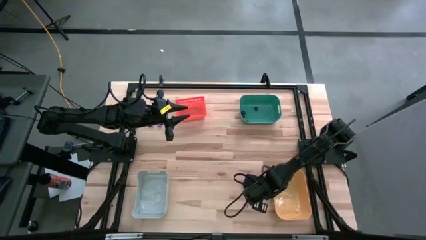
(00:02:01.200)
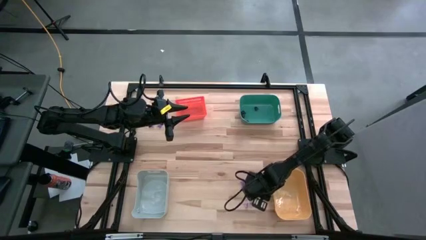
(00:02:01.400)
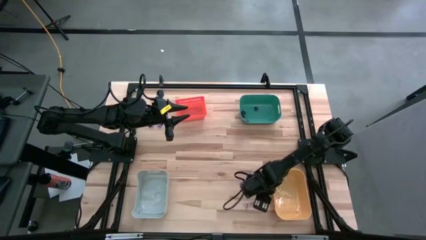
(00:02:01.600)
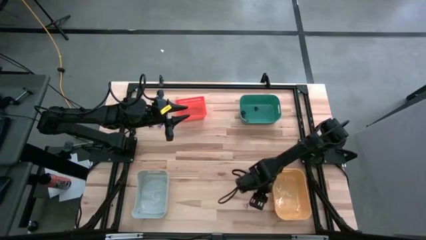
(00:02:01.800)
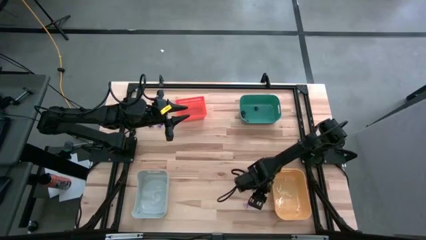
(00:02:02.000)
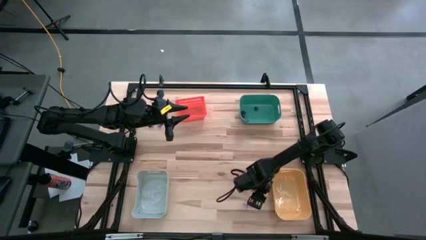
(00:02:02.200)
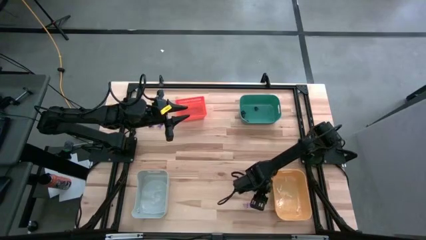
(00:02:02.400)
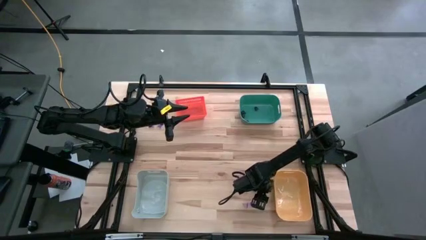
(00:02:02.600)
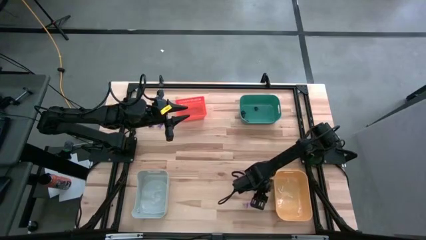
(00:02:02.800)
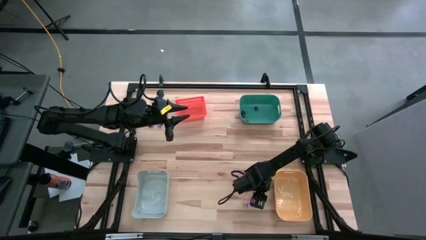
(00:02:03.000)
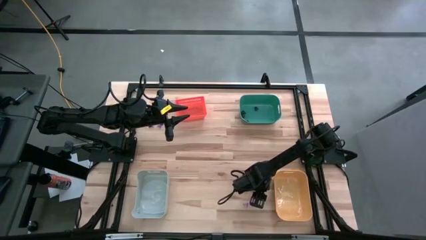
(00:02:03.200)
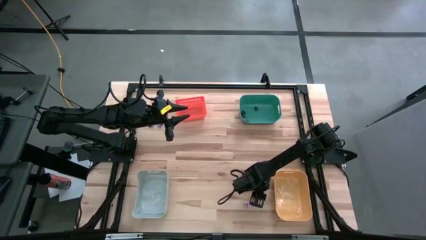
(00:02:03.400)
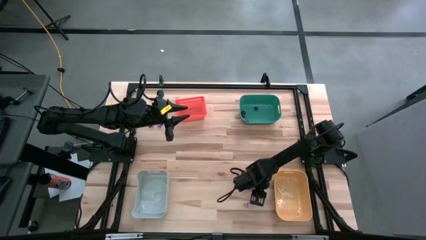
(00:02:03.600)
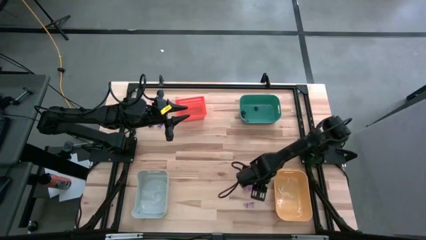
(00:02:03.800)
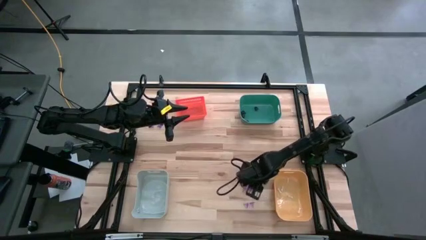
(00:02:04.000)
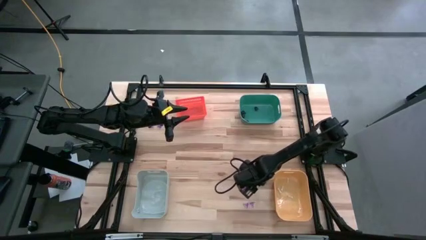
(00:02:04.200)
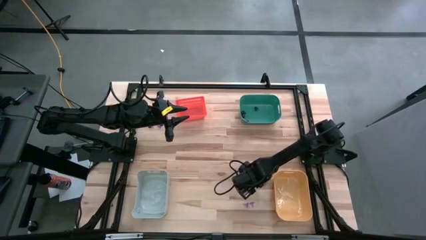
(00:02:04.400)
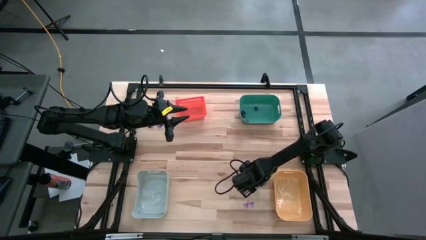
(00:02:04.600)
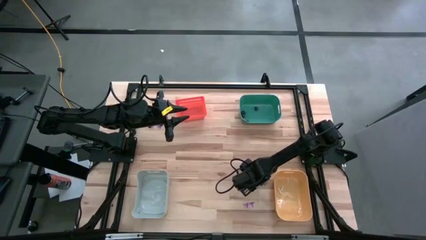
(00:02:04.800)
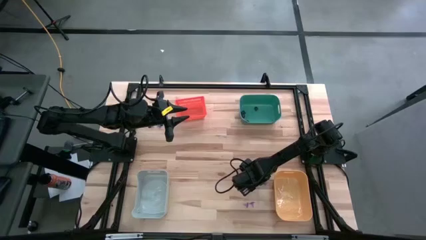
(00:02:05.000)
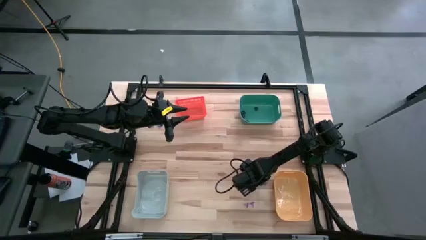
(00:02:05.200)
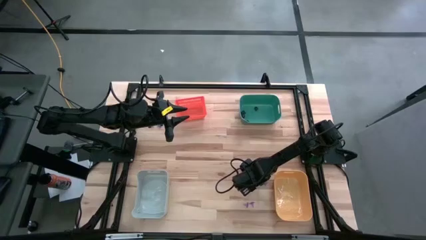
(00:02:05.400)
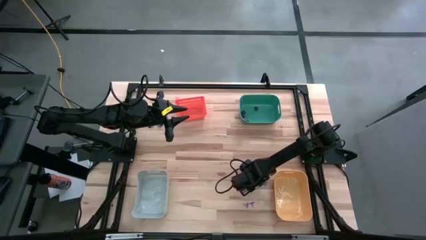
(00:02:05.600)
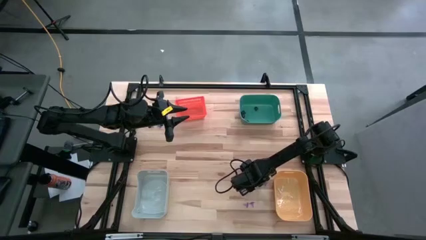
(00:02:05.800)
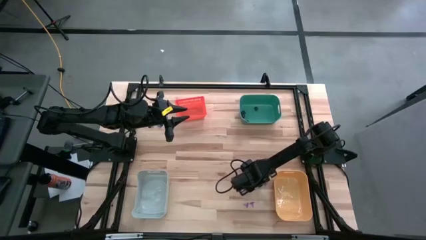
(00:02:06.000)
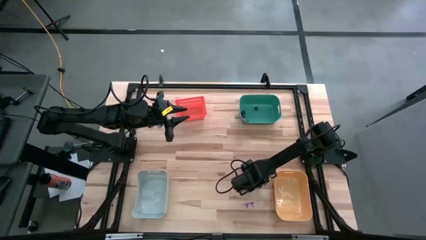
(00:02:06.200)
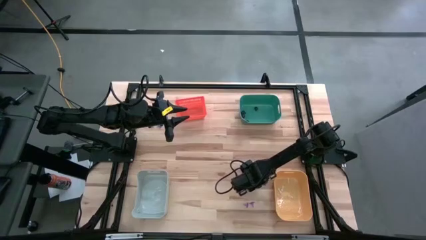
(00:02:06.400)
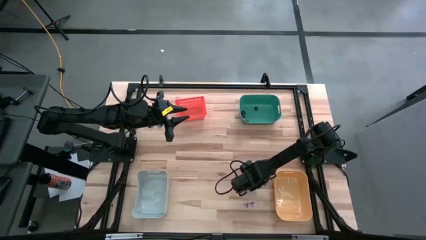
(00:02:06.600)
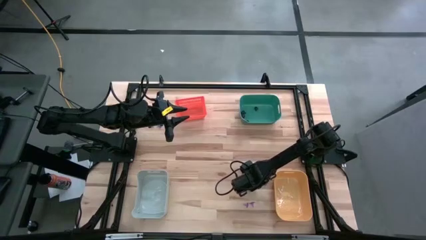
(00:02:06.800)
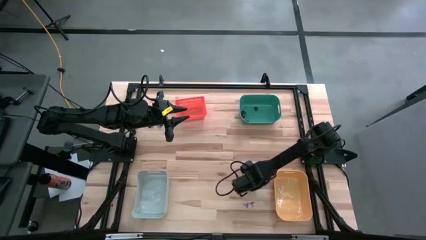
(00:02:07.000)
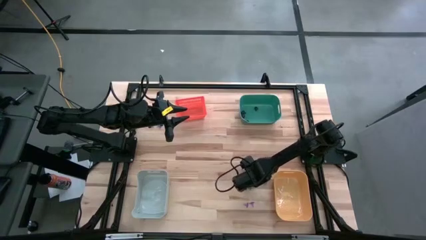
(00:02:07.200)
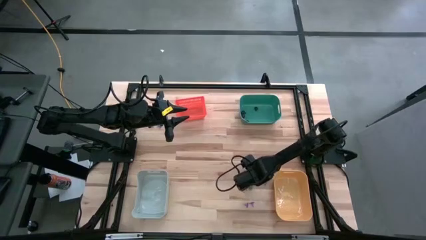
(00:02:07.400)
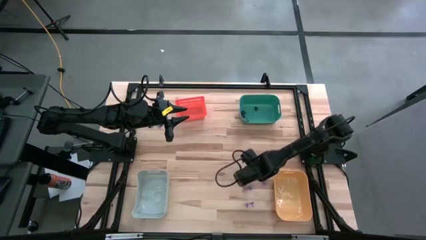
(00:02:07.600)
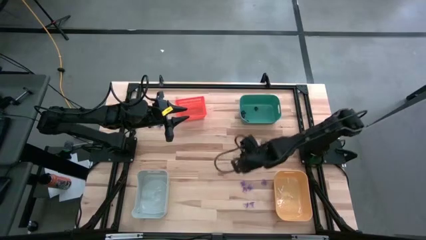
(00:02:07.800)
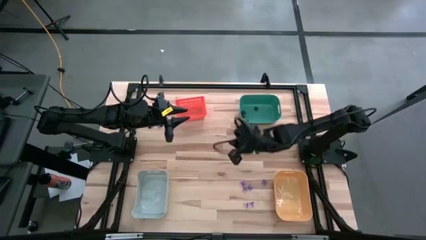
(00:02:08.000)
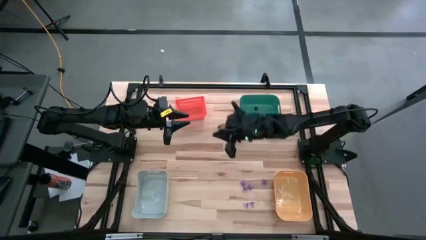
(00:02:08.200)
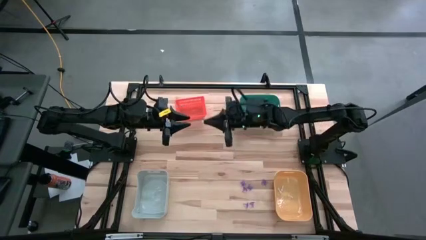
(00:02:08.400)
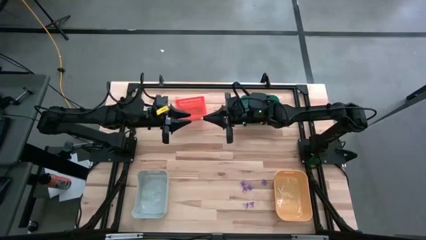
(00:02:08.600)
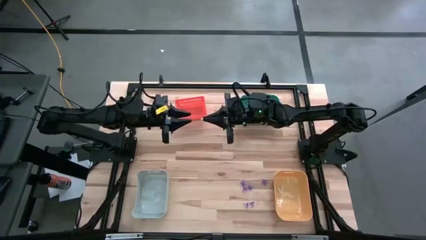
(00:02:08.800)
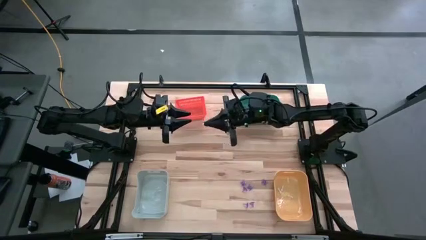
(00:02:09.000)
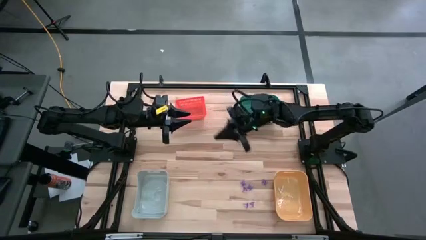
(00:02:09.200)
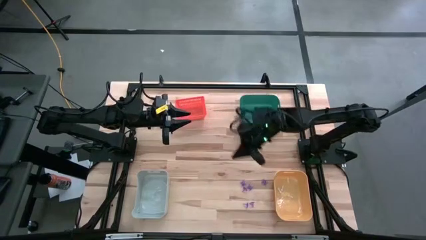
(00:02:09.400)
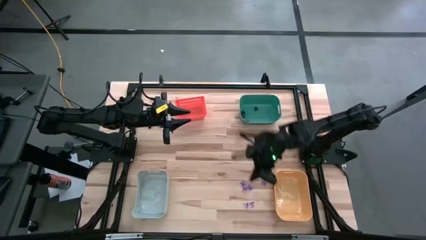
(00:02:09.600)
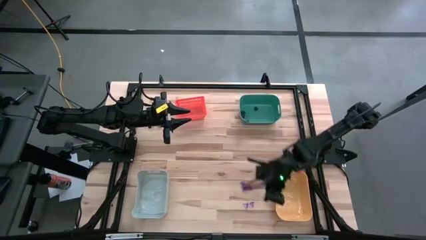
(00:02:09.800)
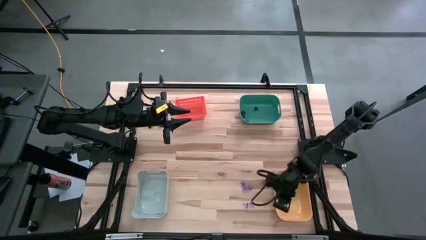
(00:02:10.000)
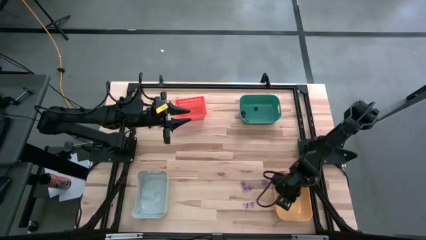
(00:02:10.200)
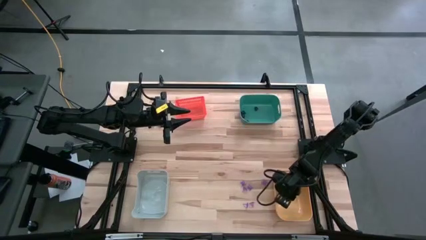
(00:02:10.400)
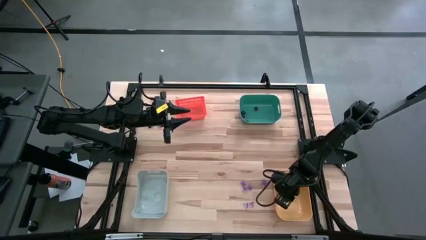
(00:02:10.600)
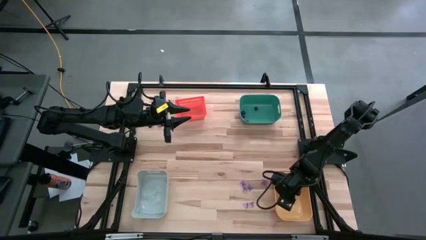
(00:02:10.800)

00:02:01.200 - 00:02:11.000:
Task: Sort Halloween decoration
Put the white bone toy into the yellow bin

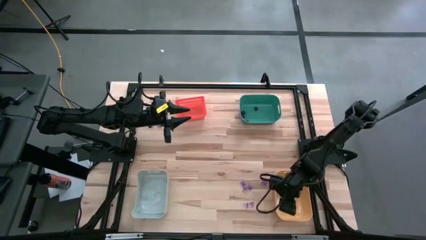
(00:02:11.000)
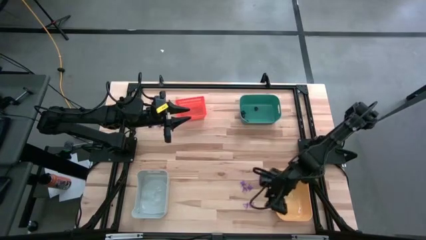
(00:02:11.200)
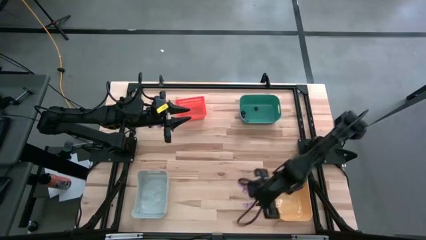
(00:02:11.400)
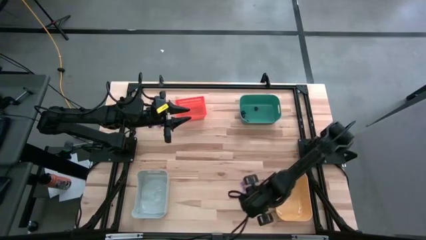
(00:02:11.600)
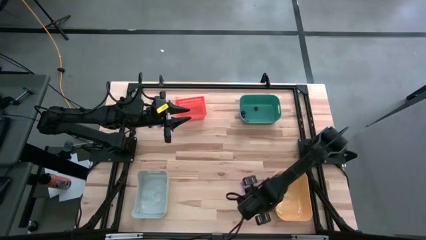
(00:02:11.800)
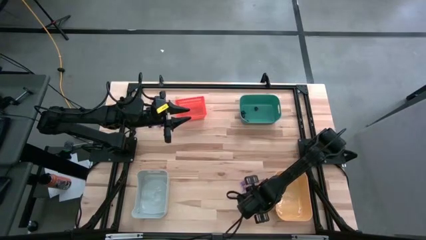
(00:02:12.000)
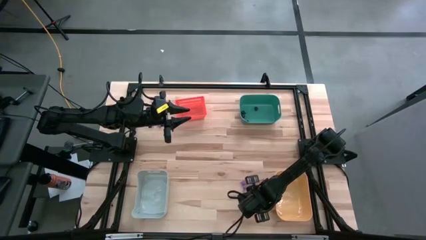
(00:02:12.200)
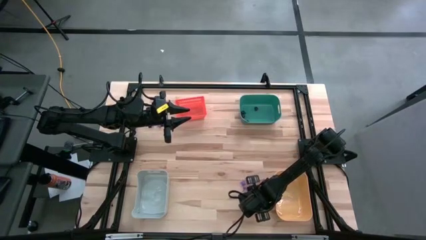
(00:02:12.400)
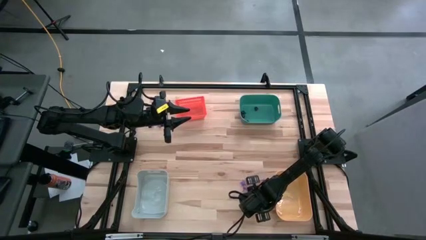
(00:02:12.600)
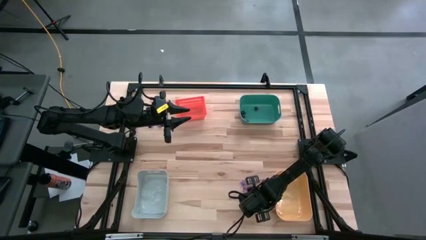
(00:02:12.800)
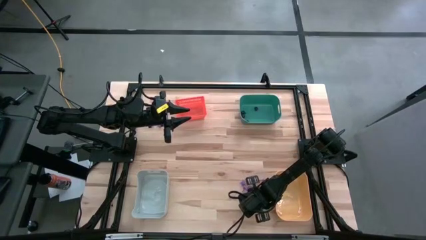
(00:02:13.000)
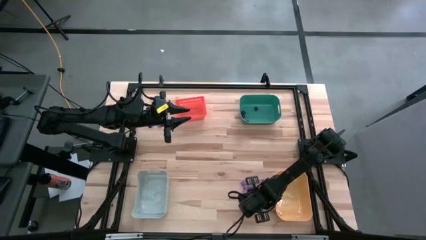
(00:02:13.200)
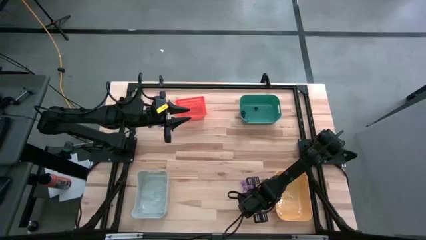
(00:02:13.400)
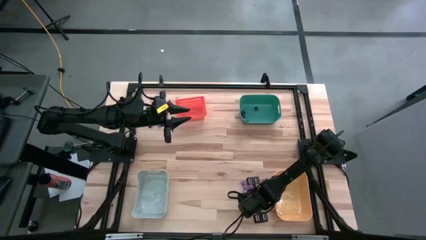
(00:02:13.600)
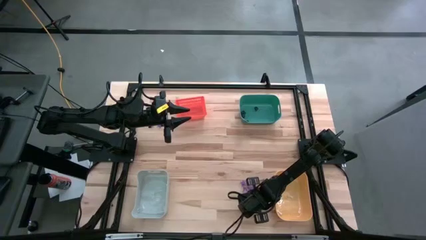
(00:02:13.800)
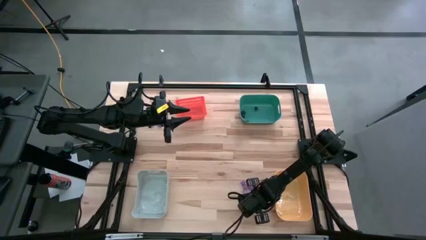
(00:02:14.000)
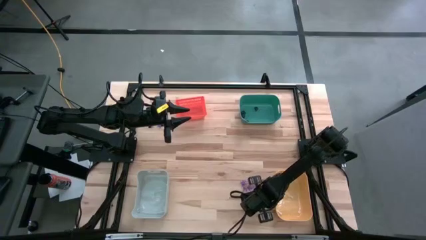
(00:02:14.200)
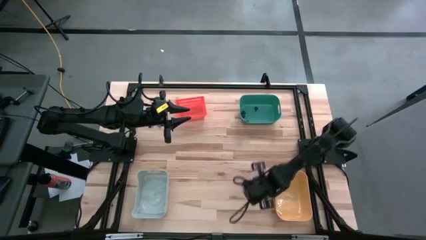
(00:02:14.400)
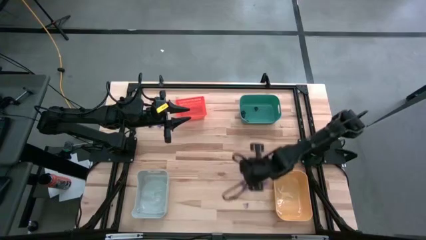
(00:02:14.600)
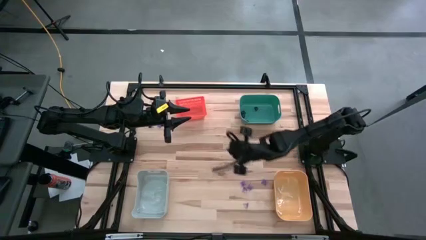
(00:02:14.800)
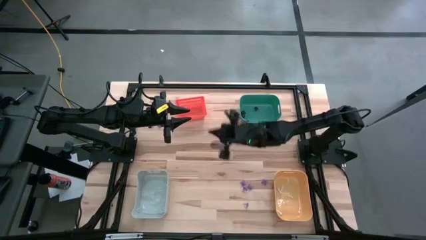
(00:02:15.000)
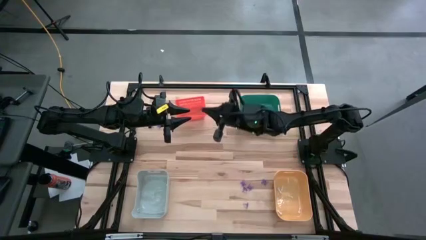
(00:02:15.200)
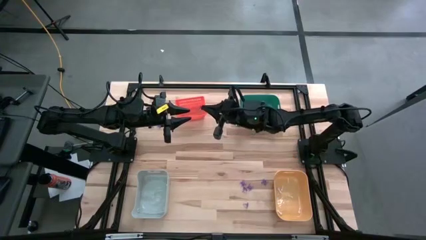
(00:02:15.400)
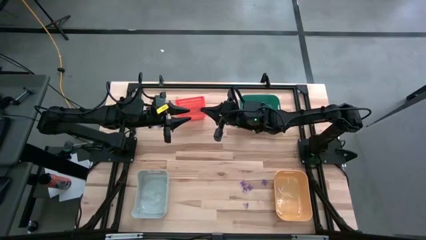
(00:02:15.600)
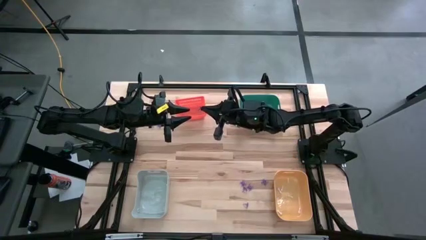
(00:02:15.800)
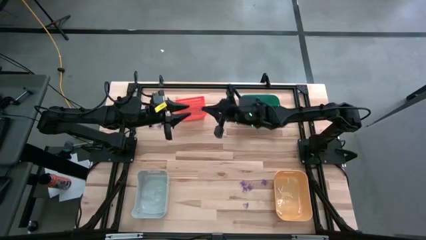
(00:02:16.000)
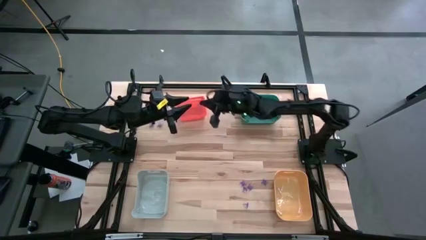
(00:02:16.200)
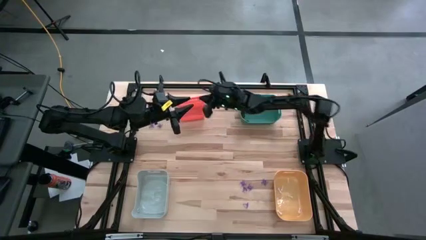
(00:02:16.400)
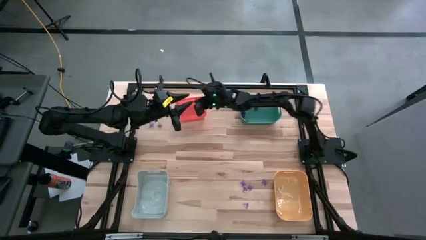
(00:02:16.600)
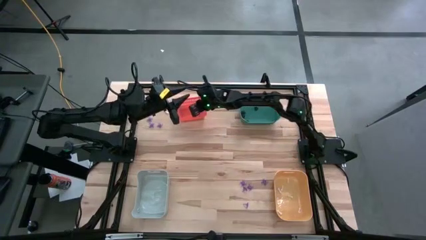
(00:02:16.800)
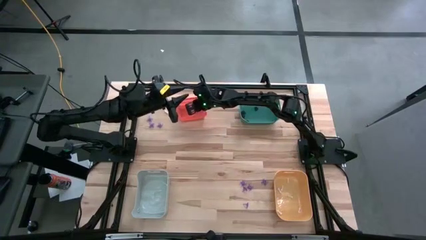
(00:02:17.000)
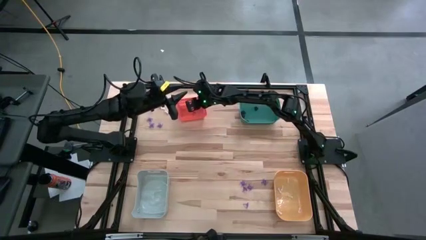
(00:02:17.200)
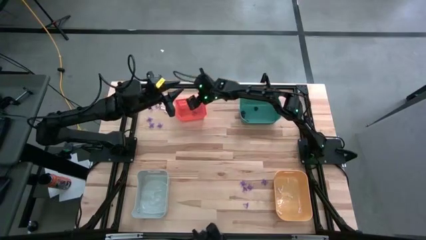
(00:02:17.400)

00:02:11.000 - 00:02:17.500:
Put the purple witch hat toy into the orange bin
